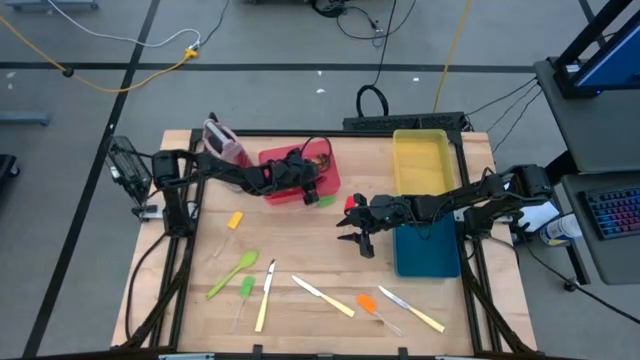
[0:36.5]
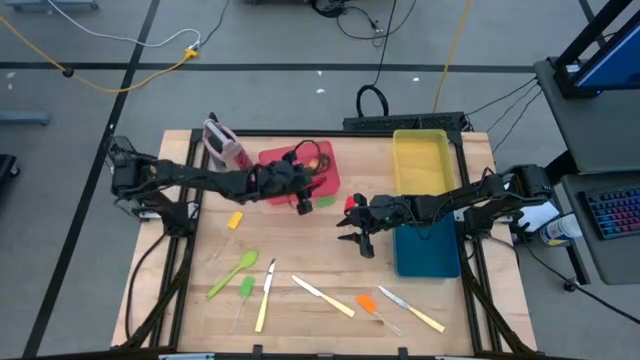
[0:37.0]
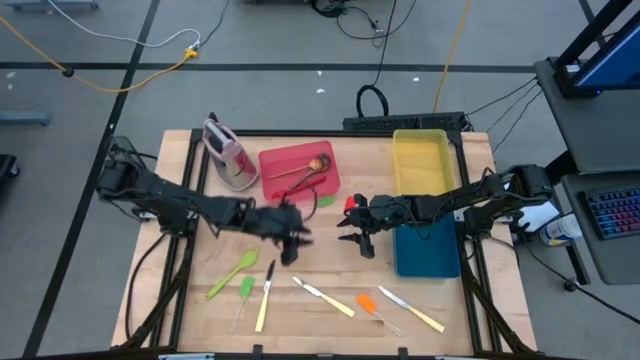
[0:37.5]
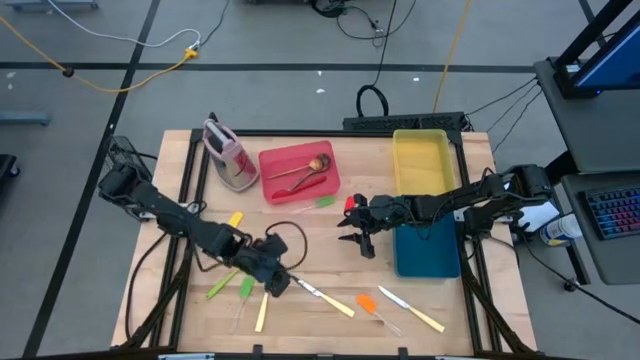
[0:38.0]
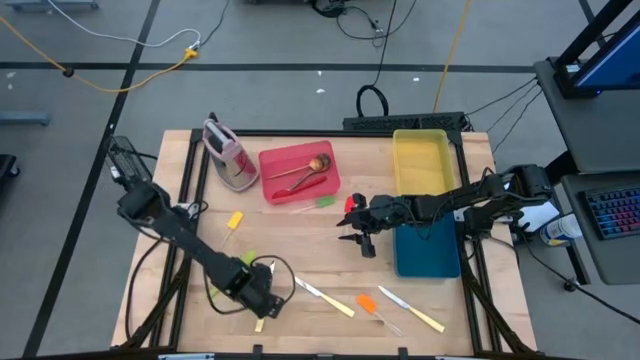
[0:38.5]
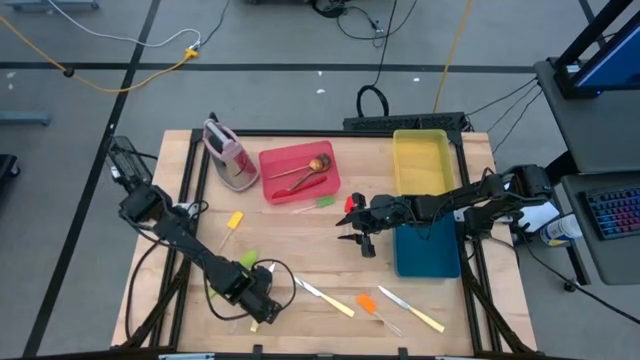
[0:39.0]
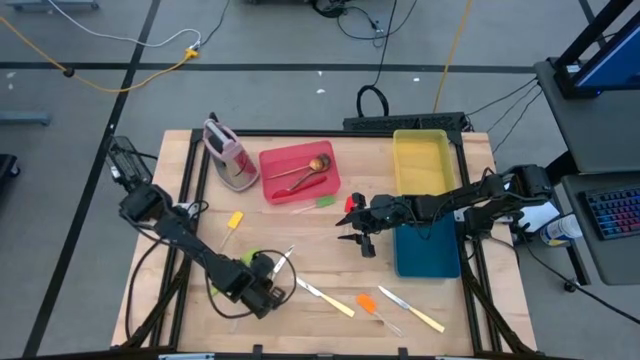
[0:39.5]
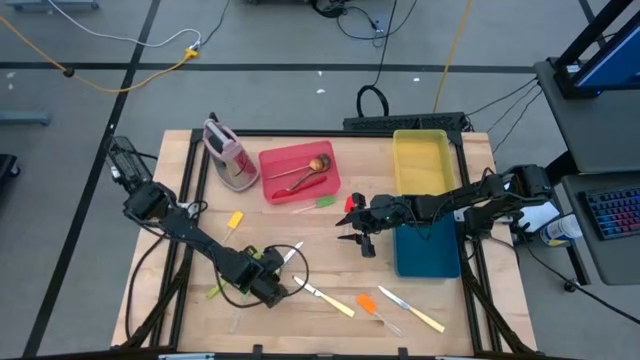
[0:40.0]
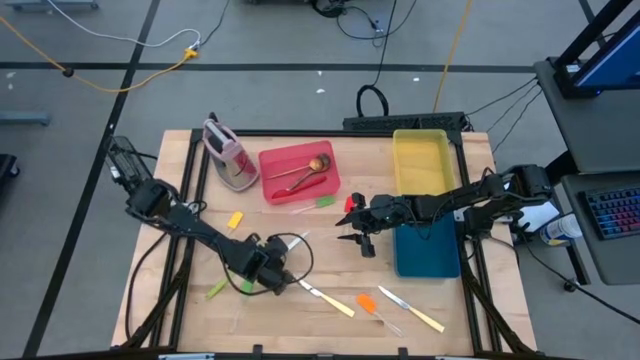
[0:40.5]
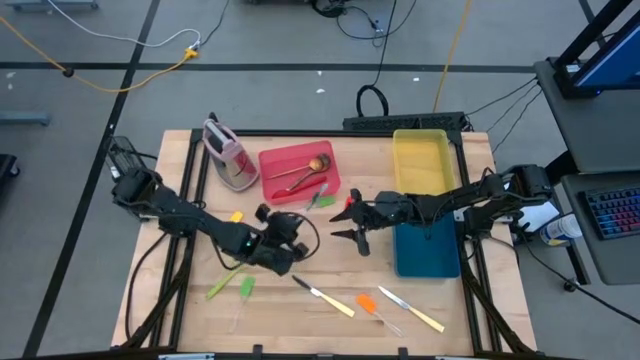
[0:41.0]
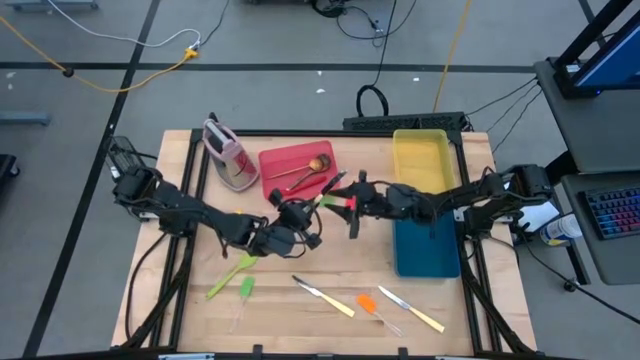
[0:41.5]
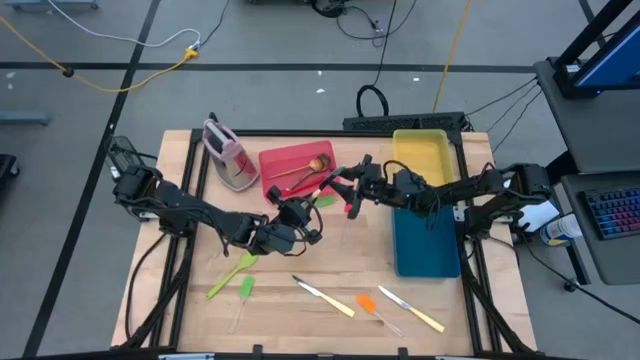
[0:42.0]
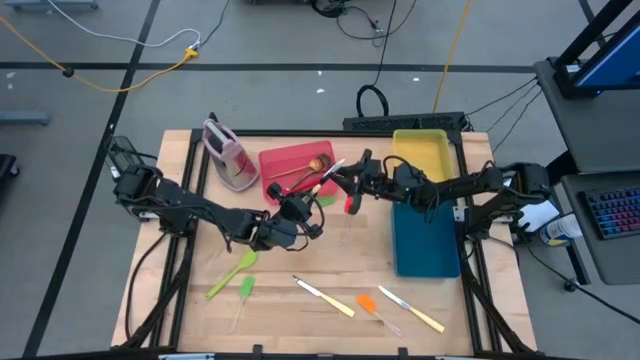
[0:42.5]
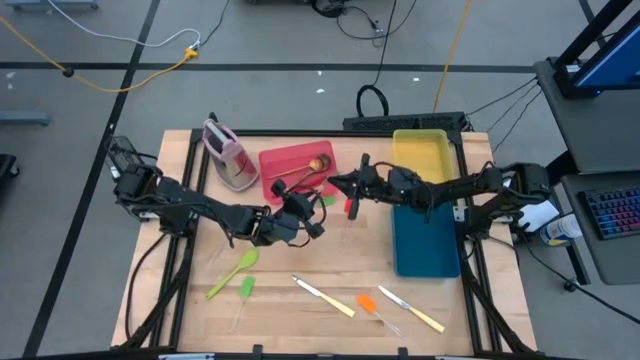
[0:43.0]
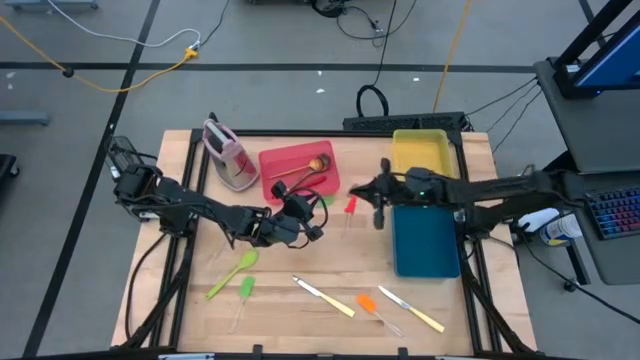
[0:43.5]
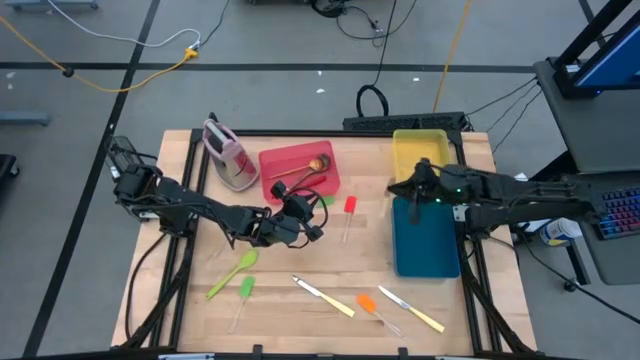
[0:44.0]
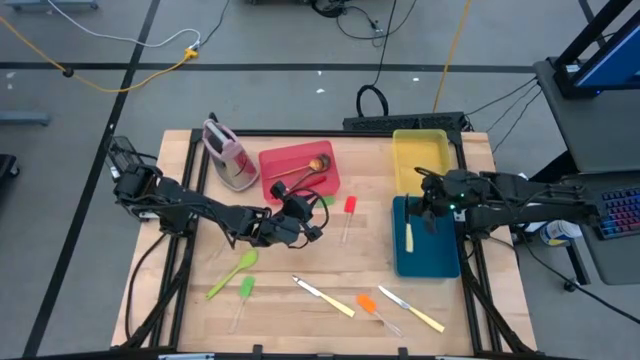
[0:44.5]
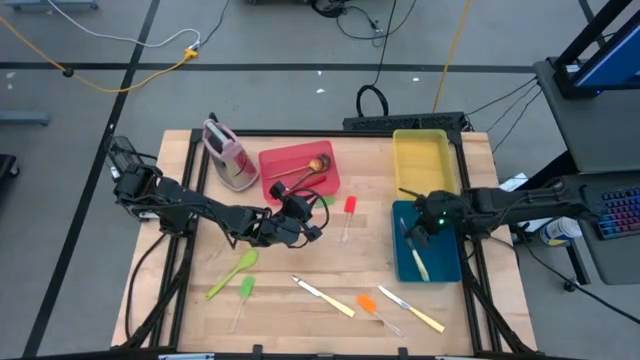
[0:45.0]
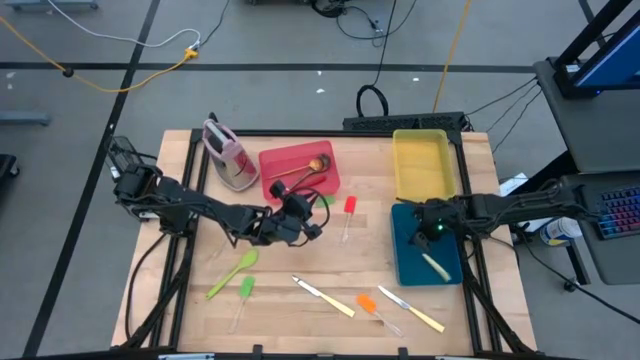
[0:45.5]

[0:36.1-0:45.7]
Task: Pick & Place Kitchen Items
Put the left yellow knife into the blue bin

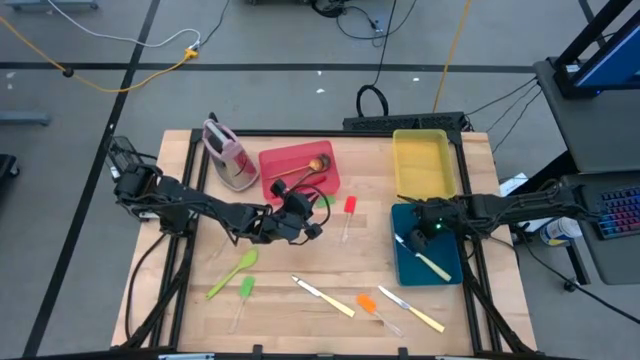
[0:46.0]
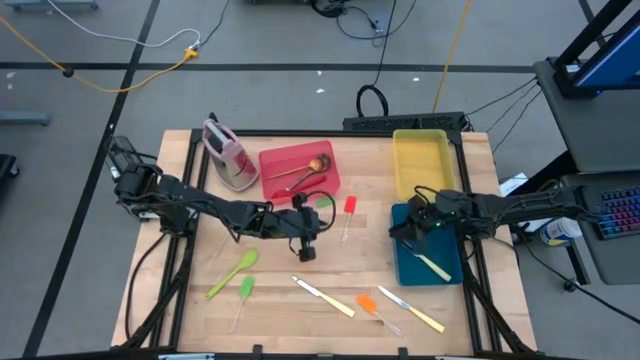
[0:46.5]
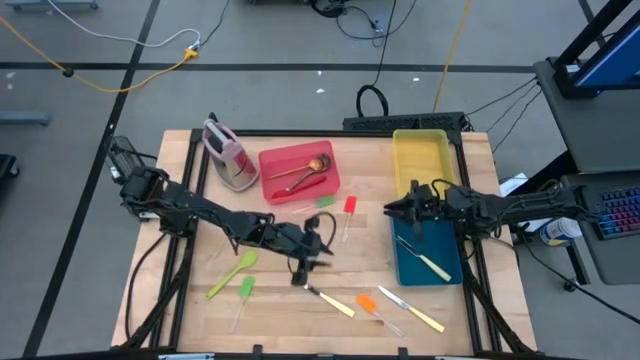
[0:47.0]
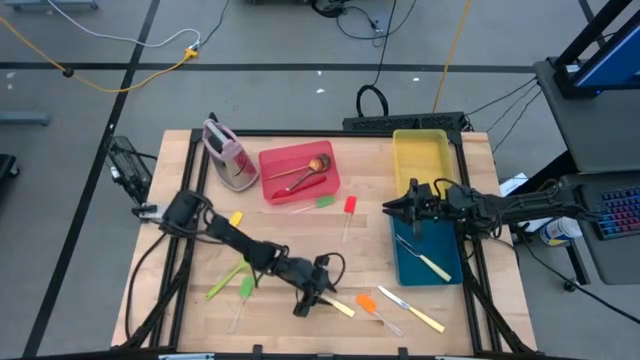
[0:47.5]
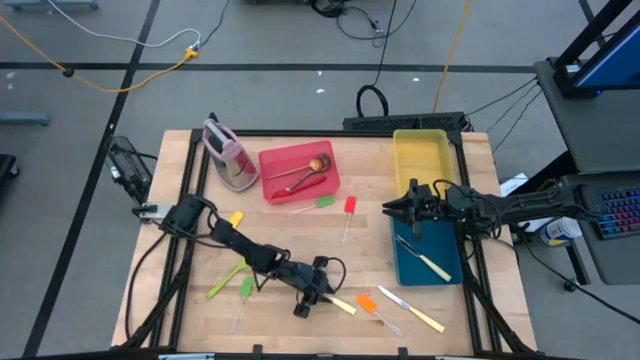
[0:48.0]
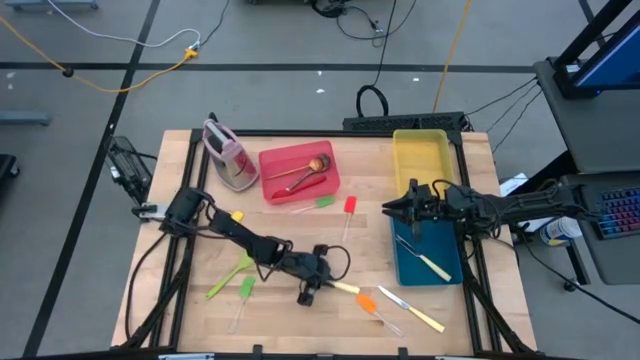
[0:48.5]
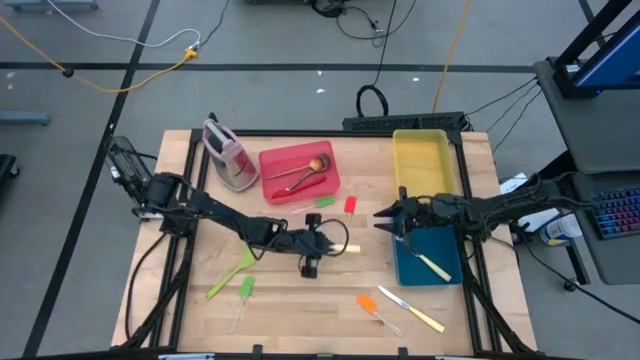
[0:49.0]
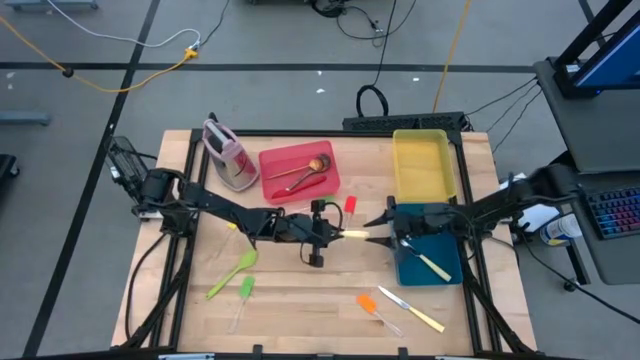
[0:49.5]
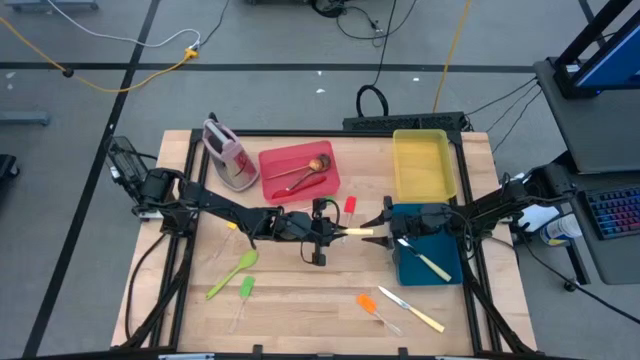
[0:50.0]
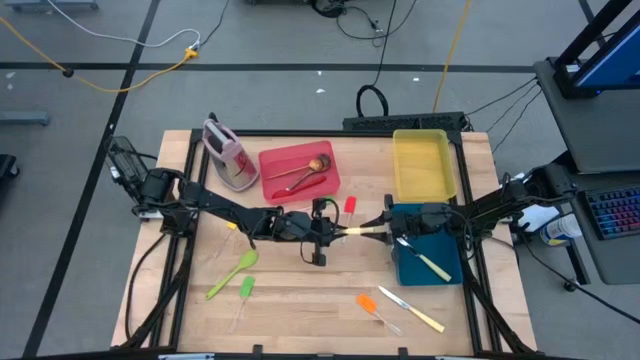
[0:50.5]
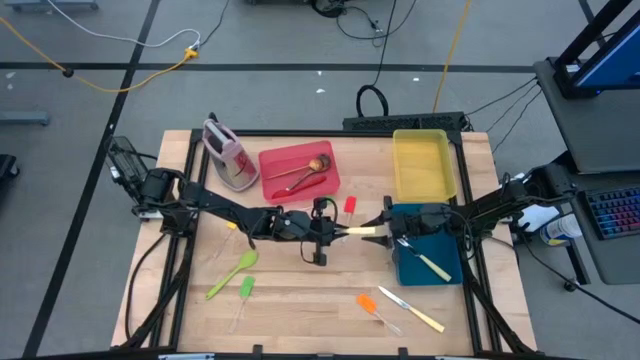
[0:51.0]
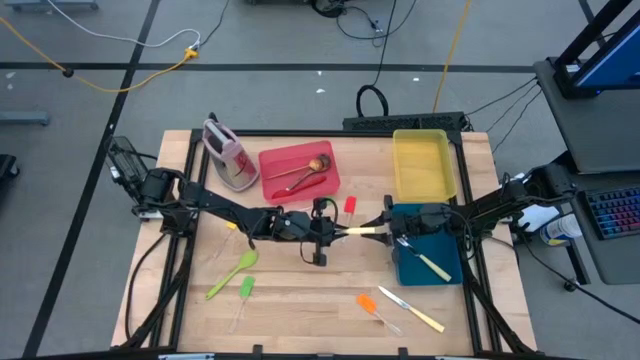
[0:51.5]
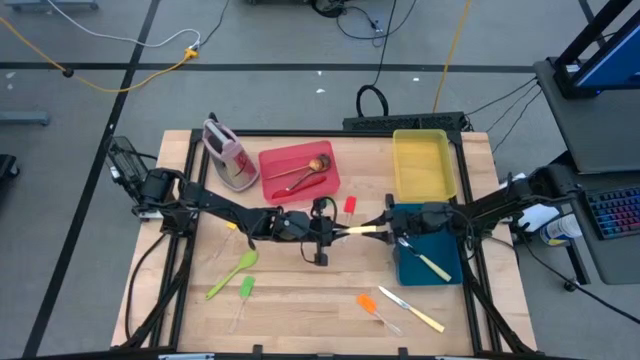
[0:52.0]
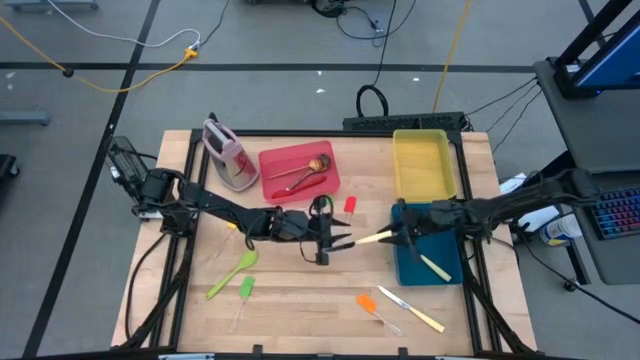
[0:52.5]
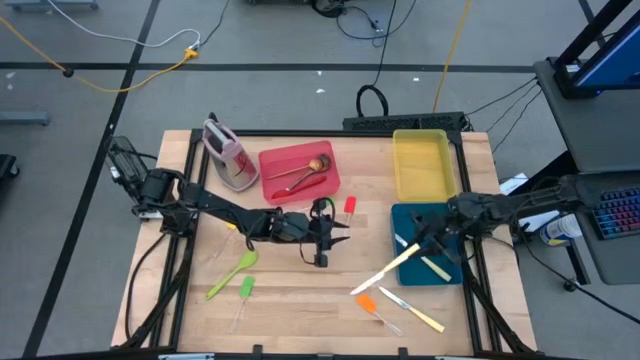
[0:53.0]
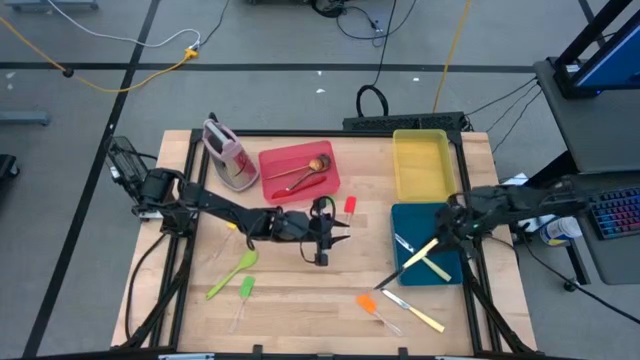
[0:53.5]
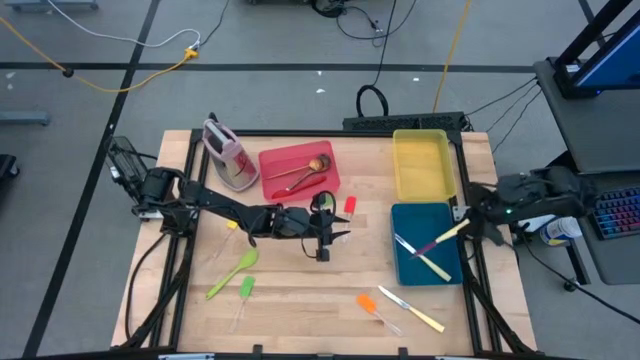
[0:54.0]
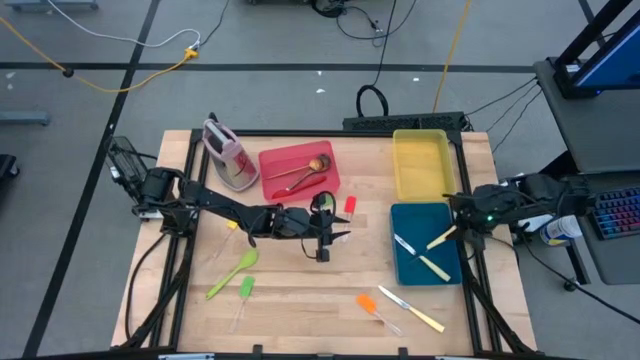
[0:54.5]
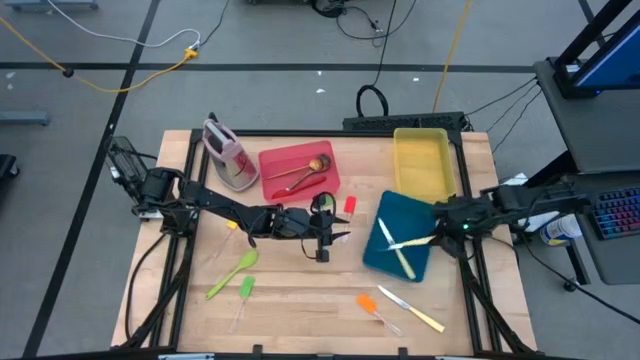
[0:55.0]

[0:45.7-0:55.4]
Put the left yellow knife into the blue bin

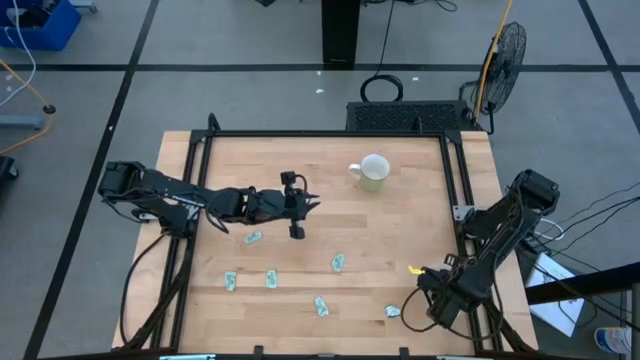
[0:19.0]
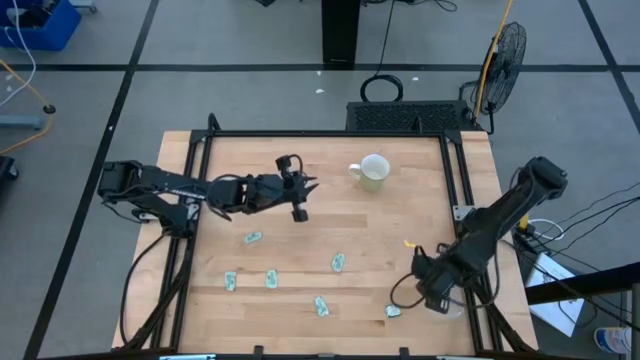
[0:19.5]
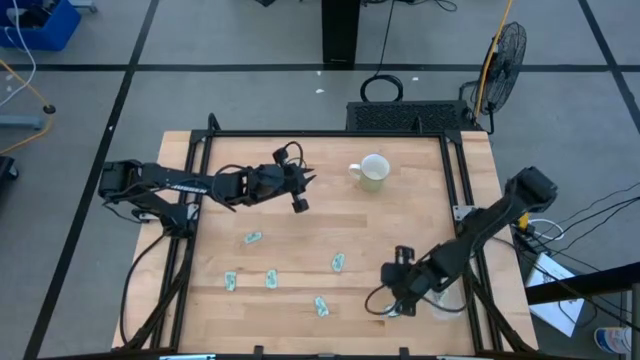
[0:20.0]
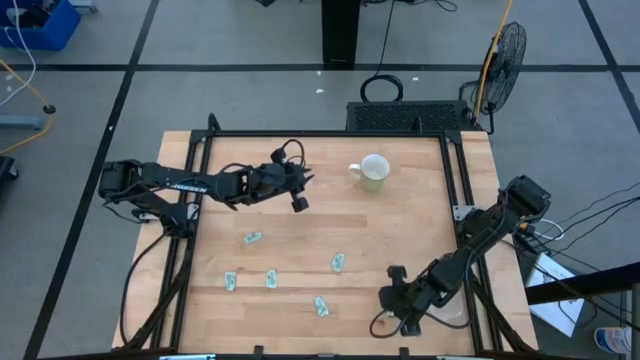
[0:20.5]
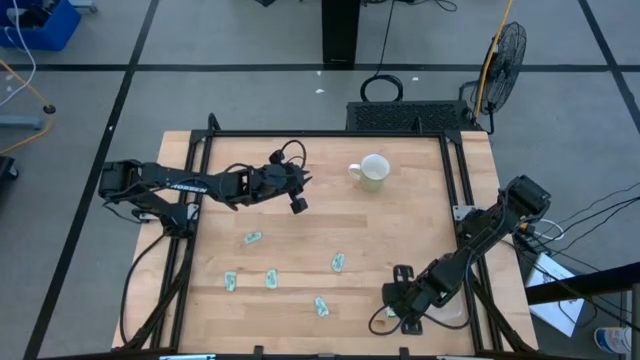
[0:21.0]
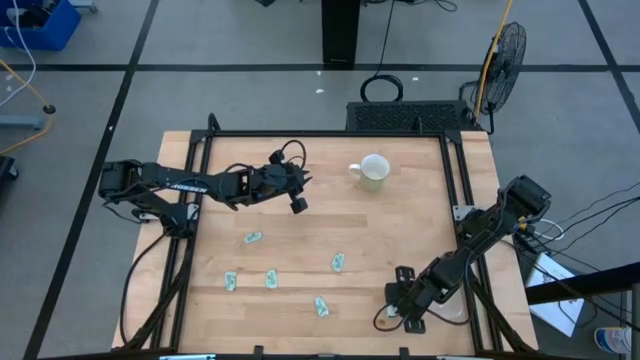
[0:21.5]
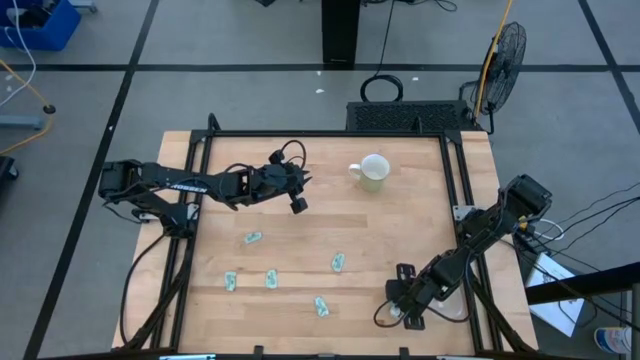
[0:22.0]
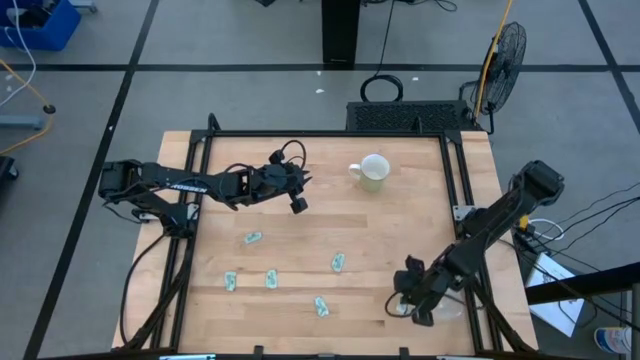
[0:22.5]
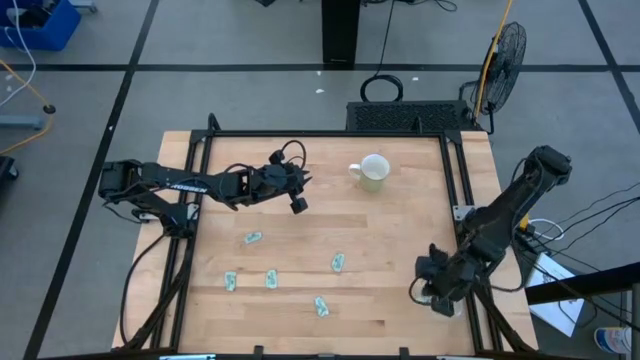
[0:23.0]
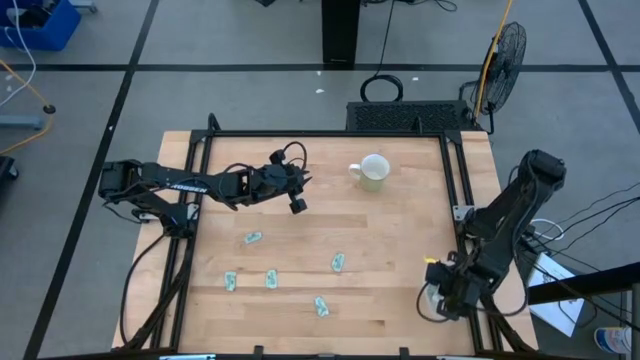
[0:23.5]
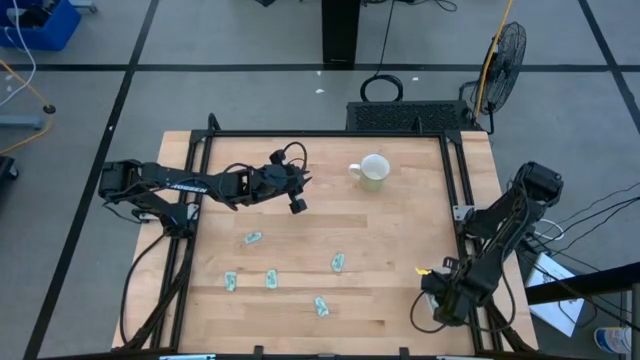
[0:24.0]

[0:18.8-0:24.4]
Task: Pick and place Stevia / Truvia into bins
Put the stevia packet into the transparent bin
